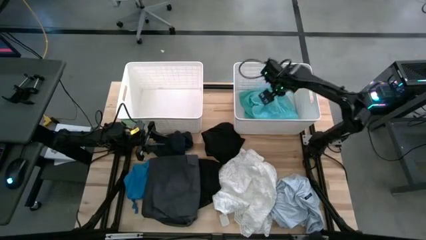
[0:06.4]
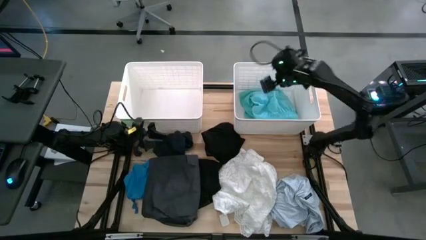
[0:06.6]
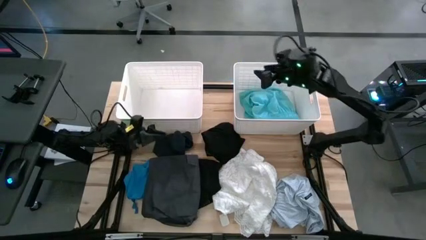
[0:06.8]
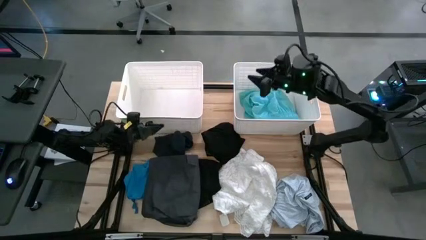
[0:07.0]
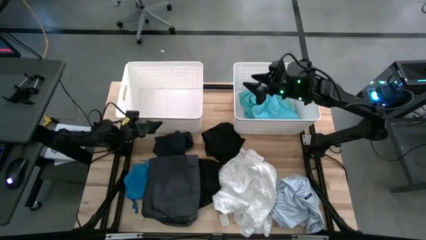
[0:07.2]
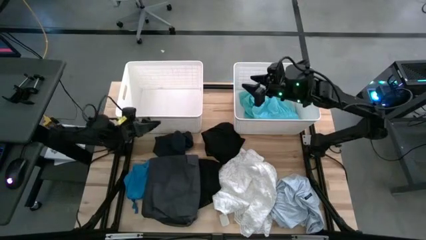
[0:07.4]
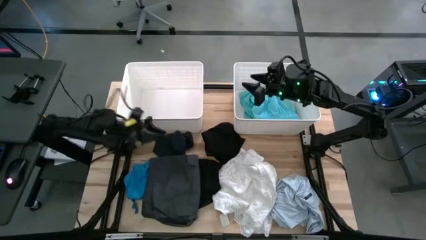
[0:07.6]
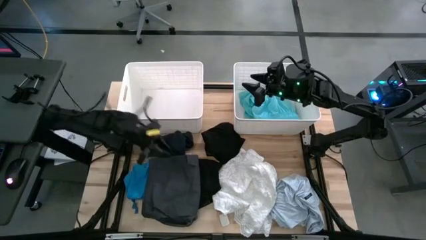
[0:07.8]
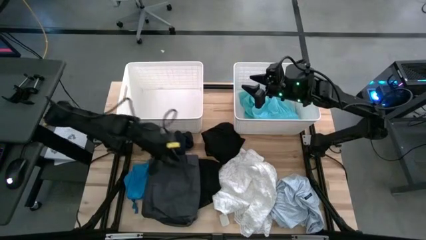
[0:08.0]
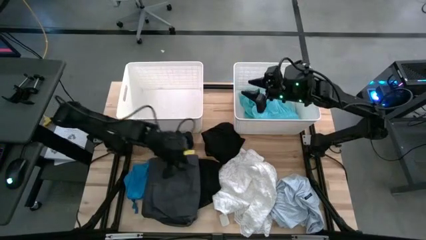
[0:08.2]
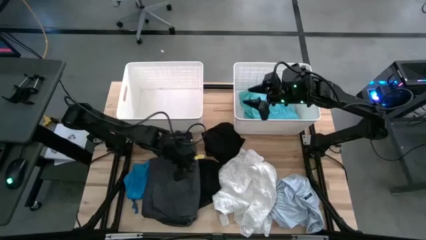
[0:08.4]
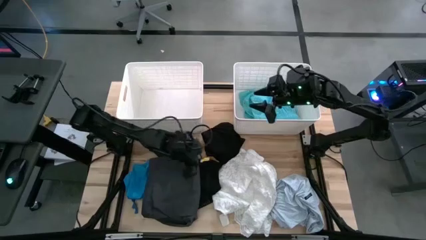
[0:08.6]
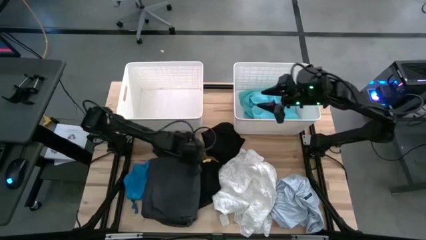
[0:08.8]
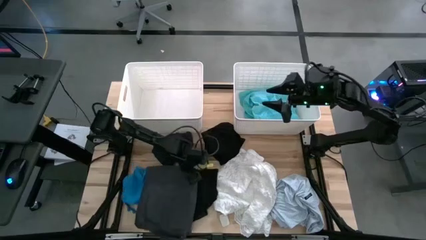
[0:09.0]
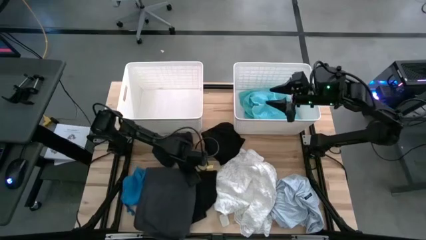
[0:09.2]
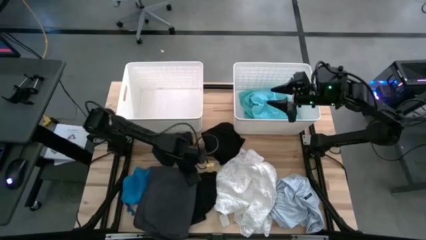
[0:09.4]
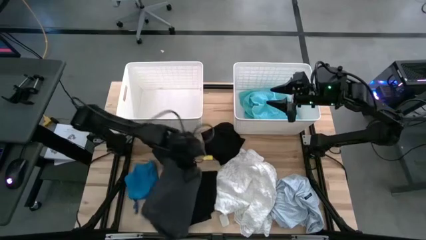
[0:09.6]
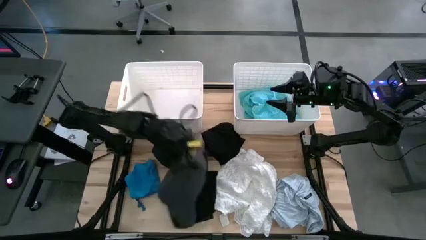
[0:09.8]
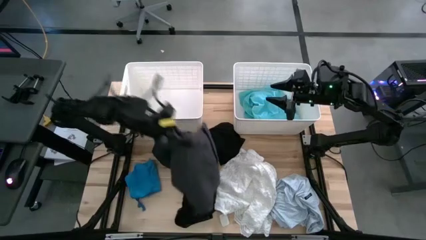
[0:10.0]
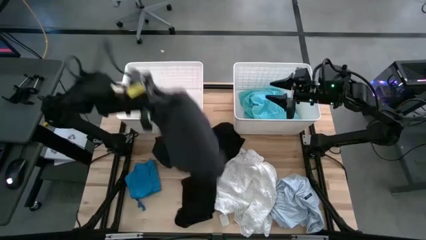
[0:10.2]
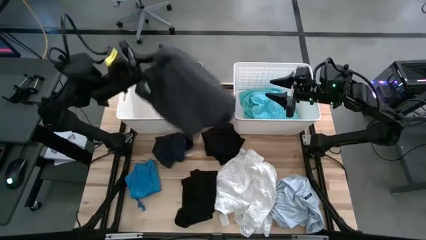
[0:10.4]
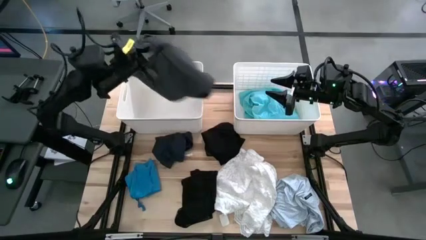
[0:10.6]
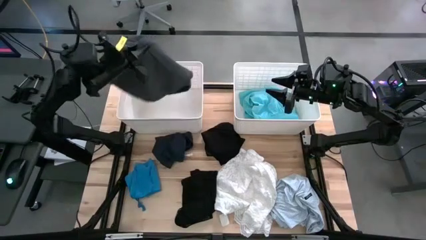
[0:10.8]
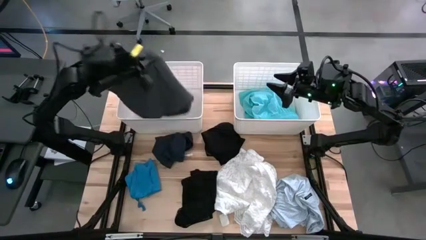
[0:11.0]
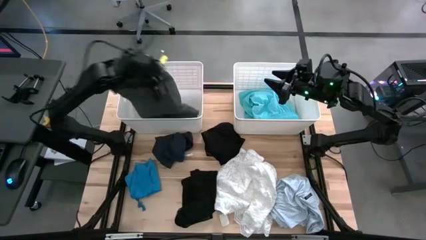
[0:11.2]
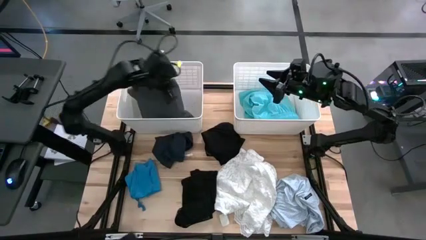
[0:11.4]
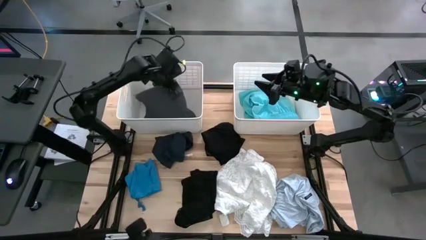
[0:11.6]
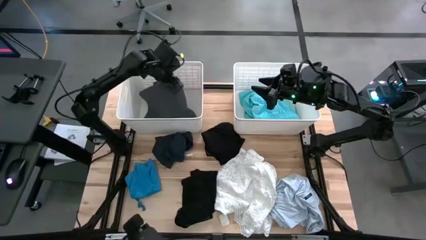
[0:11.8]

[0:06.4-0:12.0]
Task: Sort clothes
Put the dark gray pants into the left bin

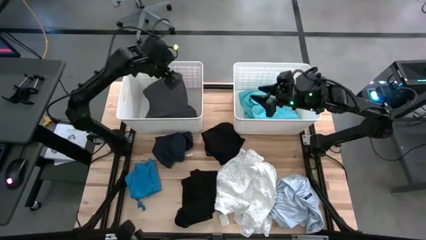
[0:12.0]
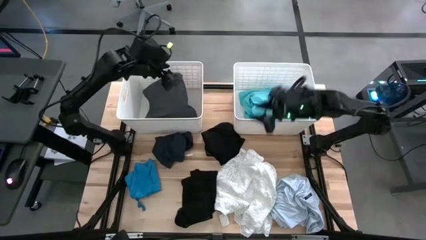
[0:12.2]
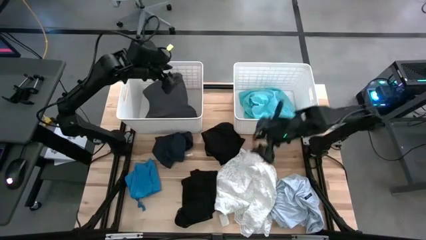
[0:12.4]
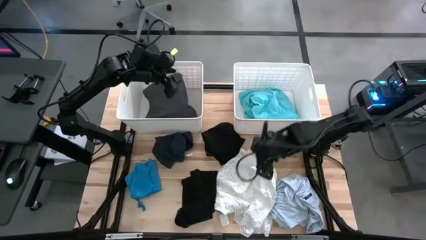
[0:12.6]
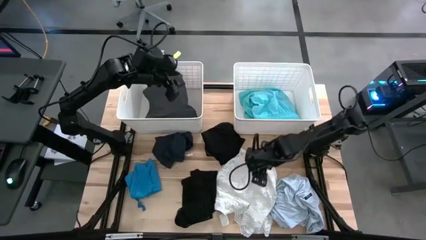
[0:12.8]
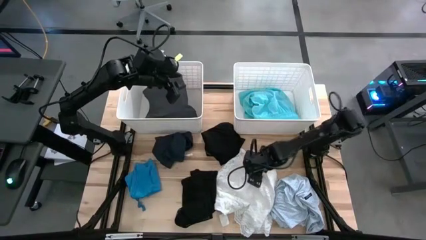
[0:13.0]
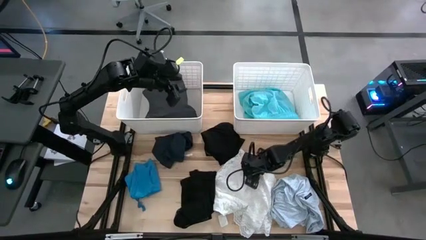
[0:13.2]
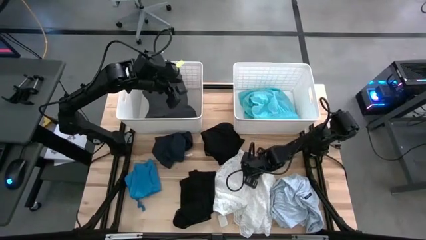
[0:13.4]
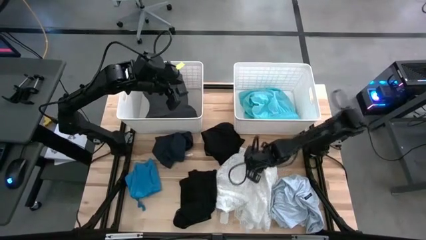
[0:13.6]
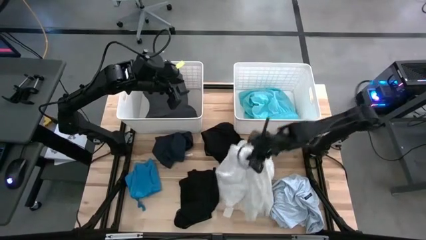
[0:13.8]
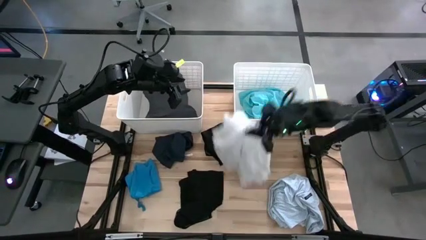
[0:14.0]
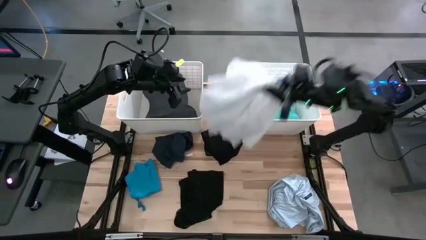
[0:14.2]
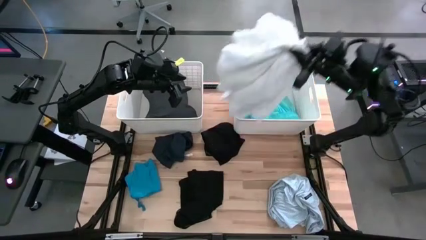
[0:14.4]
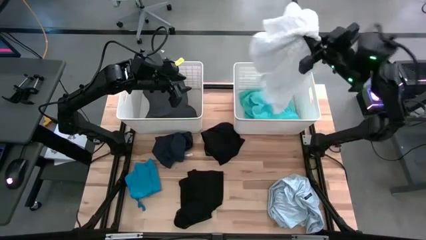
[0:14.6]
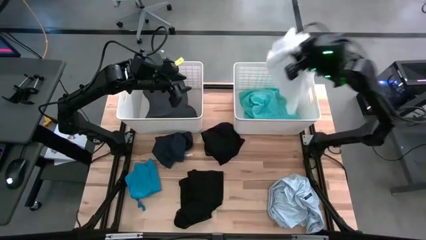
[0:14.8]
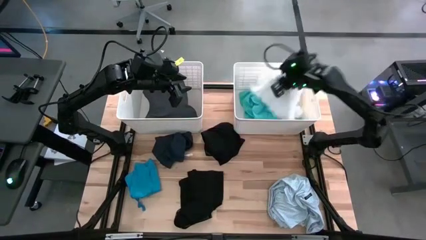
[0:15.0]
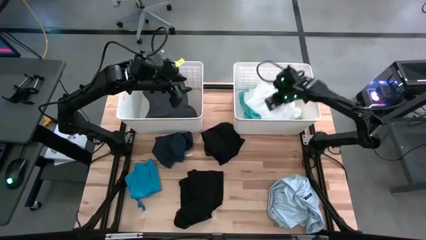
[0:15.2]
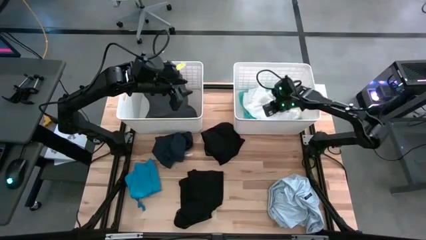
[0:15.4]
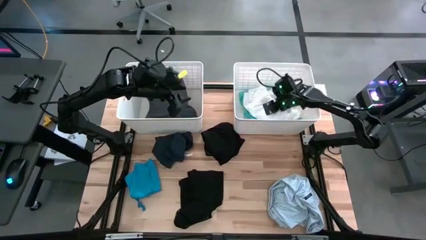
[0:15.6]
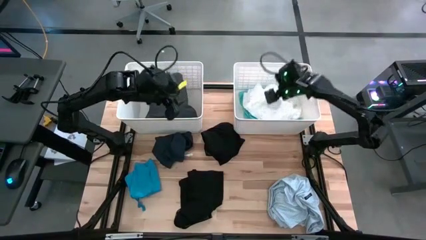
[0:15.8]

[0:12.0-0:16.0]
Put the white shirt into the right bin

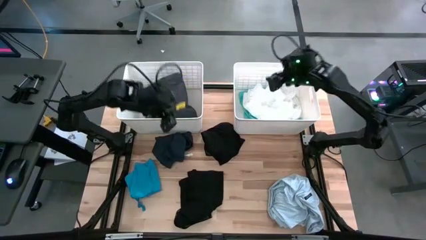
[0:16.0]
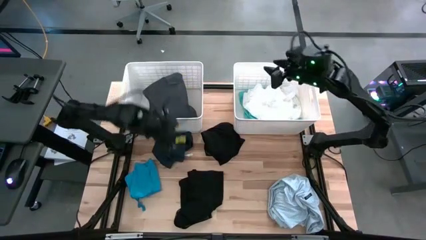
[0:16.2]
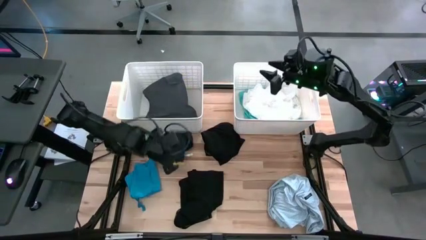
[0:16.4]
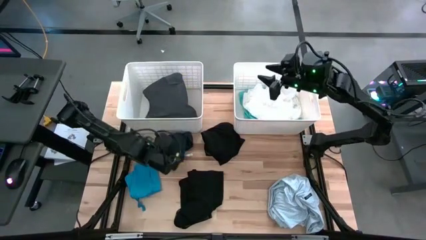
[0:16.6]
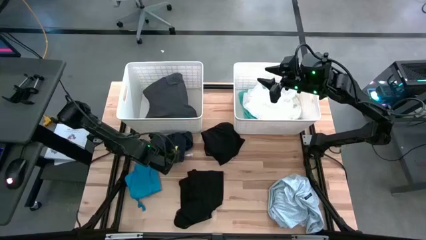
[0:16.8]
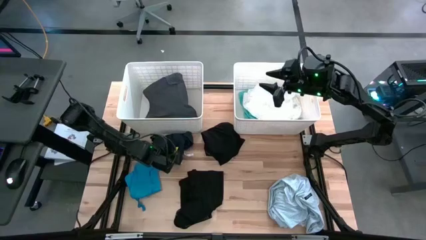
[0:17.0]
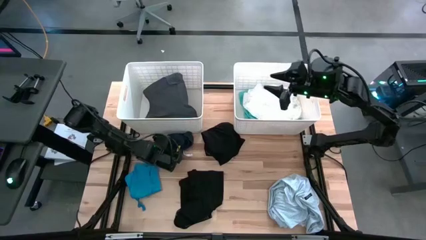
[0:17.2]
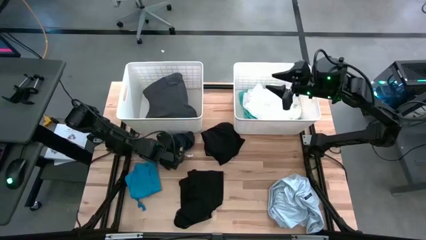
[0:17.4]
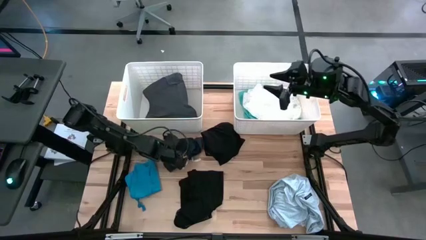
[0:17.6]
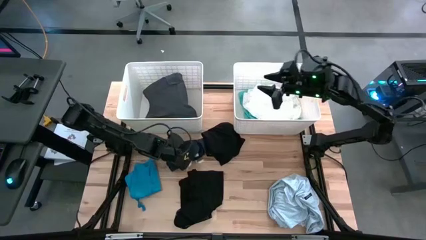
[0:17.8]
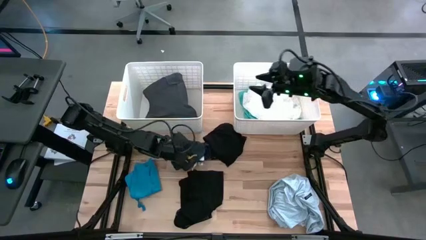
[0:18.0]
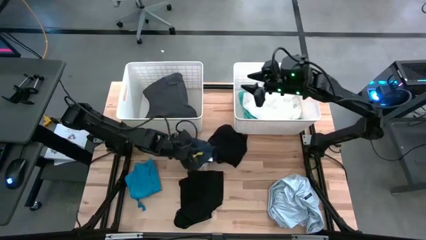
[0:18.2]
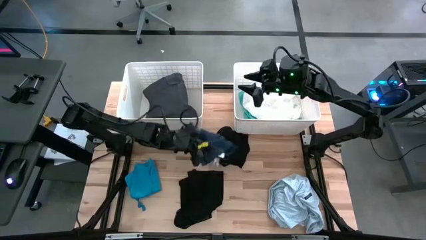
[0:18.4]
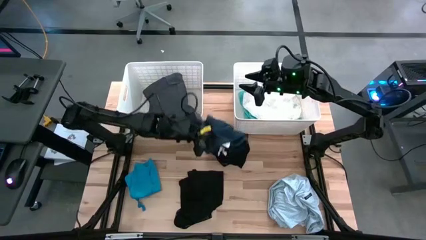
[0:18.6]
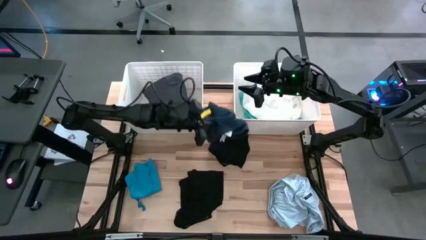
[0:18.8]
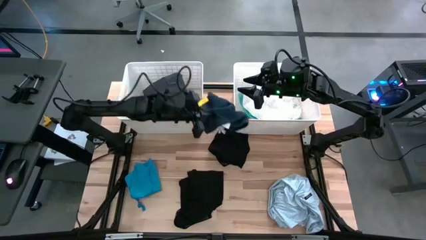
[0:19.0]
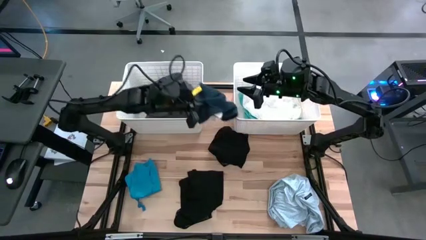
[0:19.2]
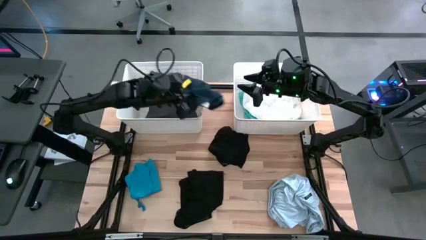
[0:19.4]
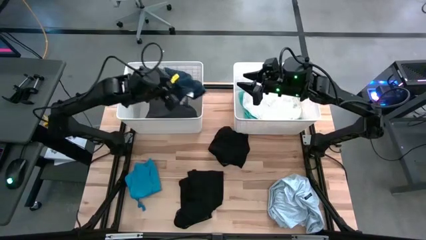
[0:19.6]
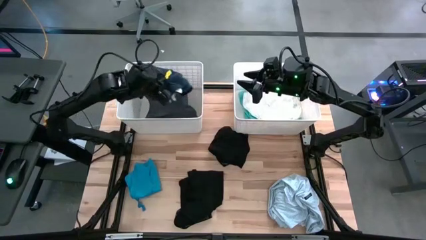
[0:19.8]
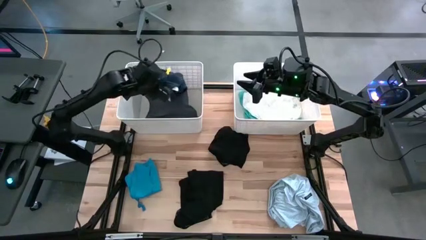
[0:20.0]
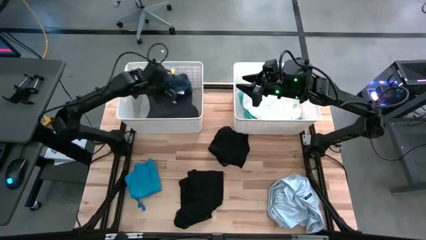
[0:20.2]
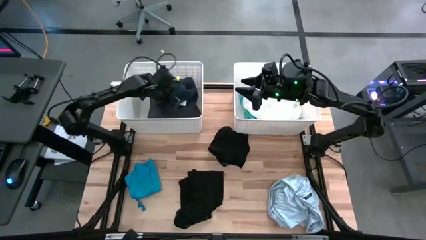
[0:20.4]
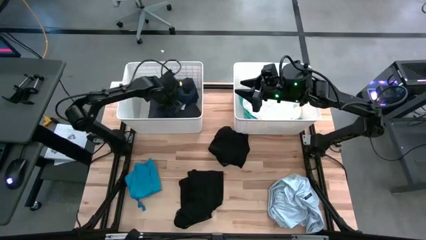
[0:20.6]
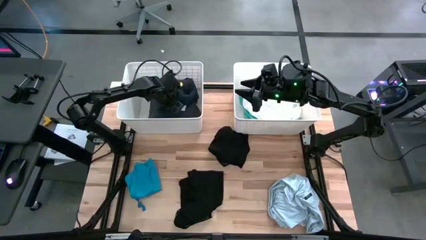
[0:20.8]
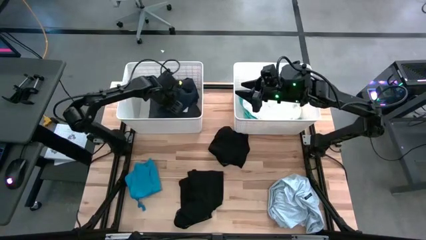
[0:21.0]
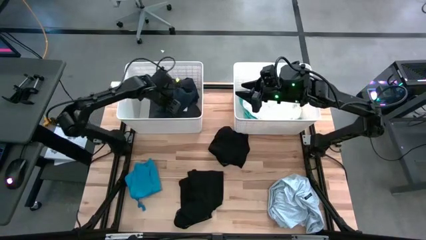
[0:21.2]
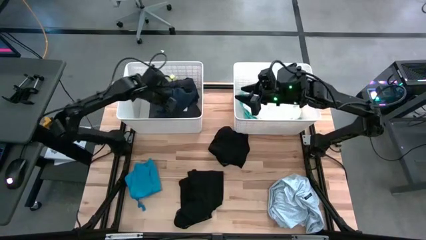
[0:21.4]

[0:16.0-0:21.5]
Put the dark blue shorts into the left bin
